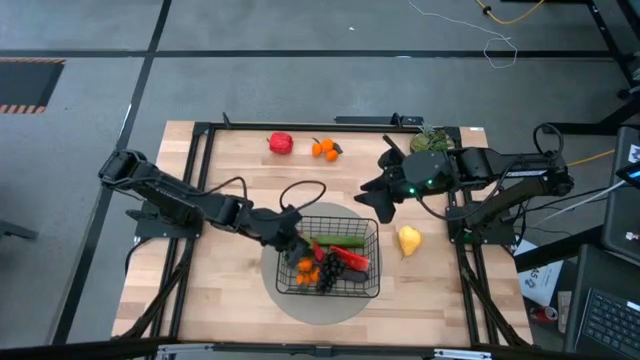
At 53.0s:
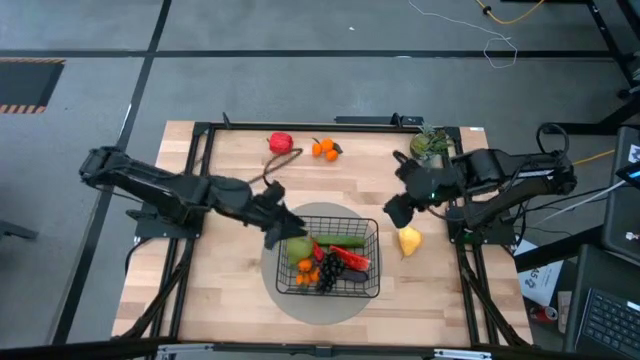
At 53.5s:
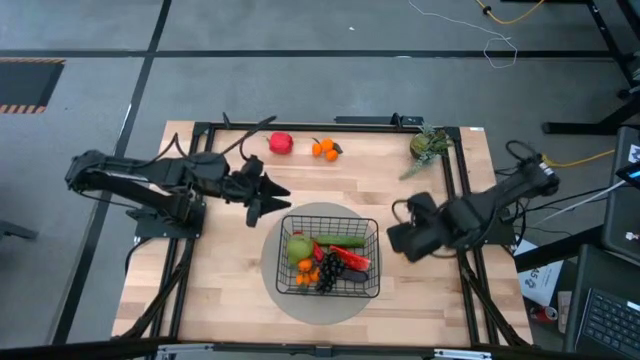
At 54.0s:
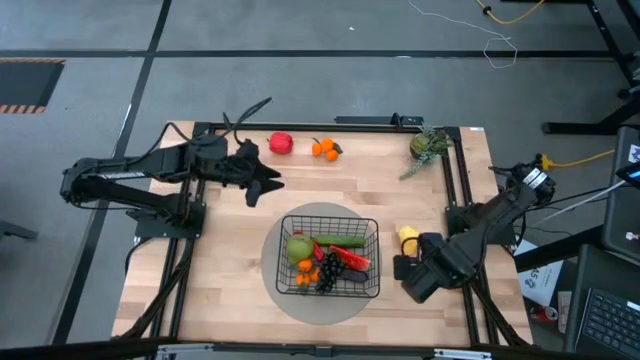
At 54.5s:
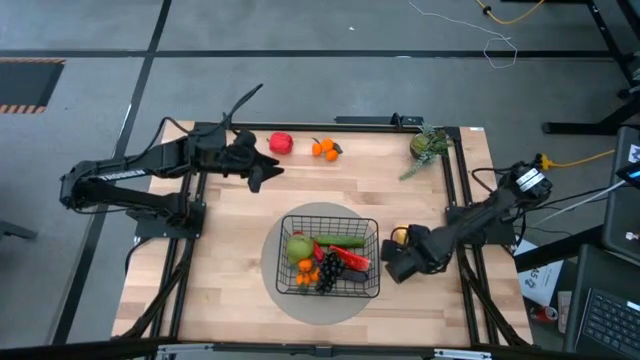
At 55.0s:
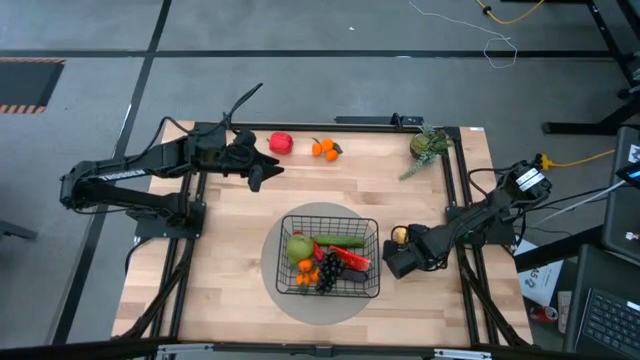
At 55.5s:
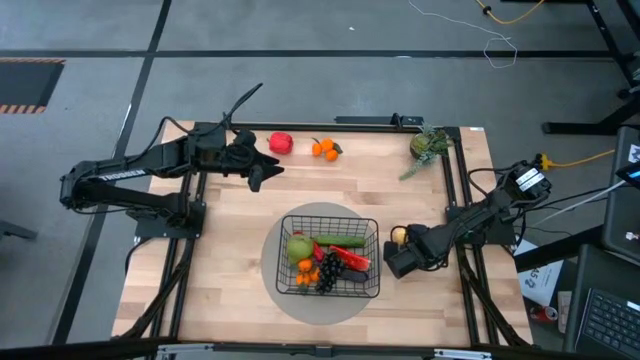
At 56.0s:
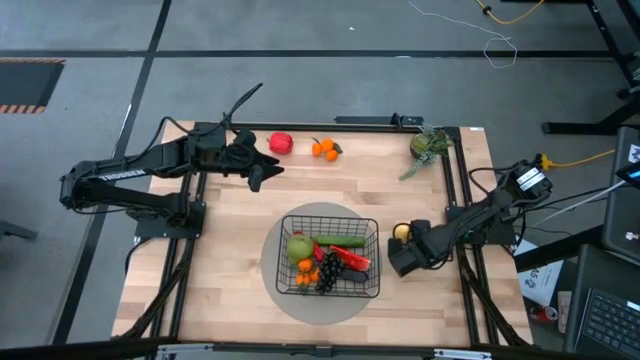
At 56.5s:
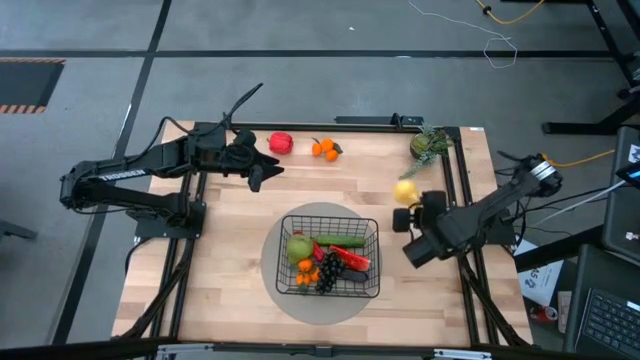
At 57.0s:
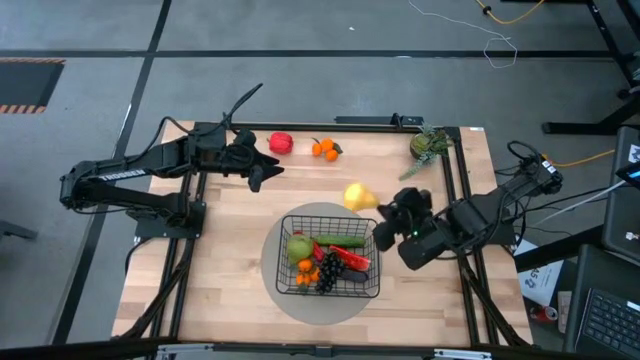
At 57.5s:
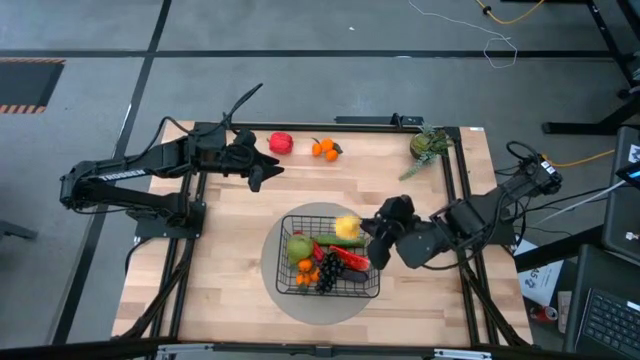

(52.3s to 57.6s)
Task: Build produce basket
Put the yellow pear into the black wire basket

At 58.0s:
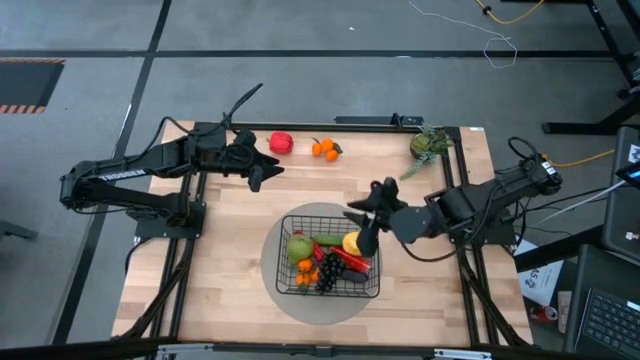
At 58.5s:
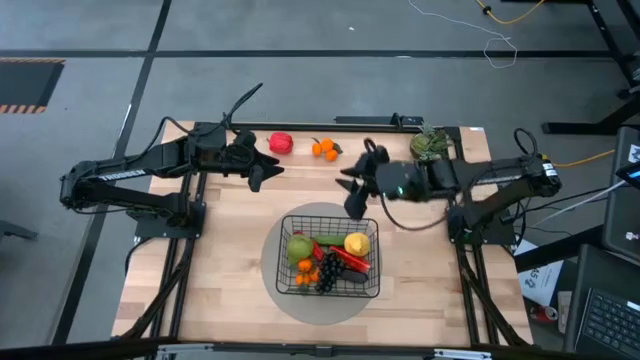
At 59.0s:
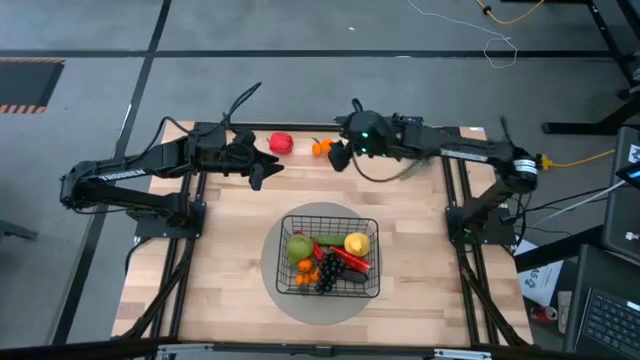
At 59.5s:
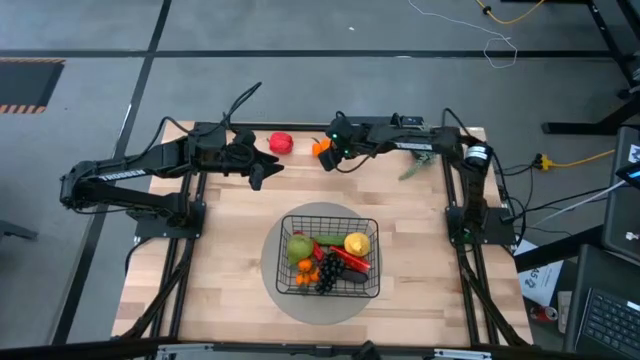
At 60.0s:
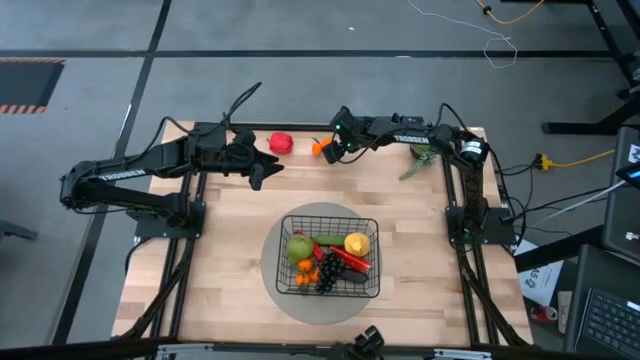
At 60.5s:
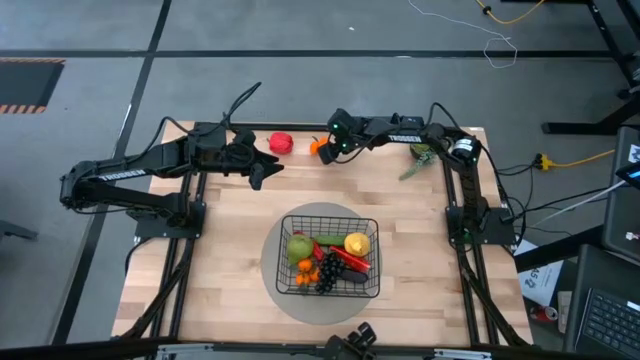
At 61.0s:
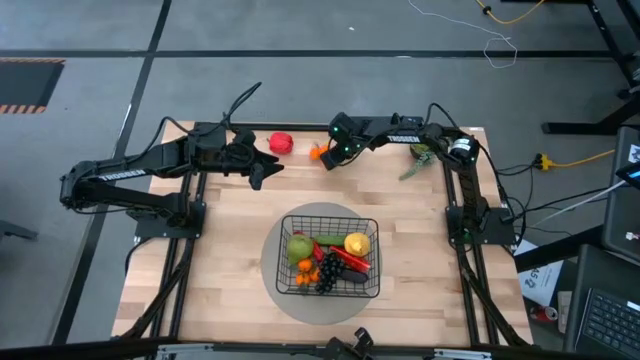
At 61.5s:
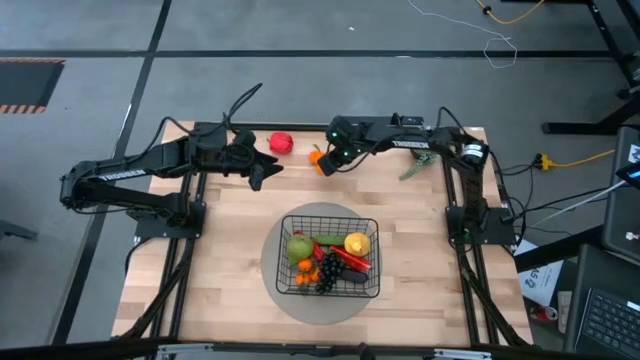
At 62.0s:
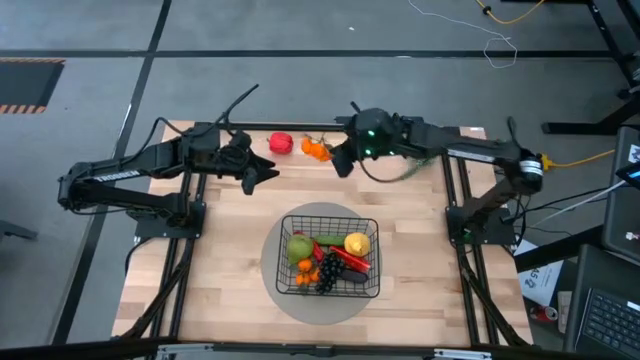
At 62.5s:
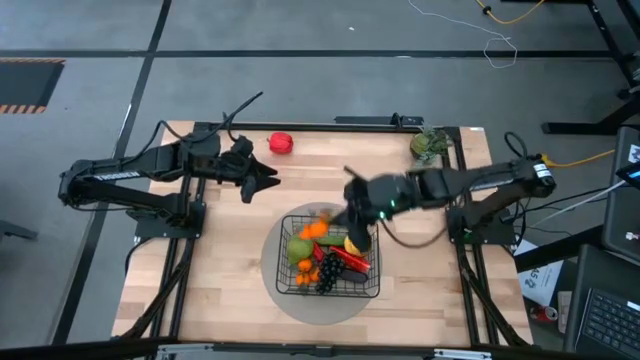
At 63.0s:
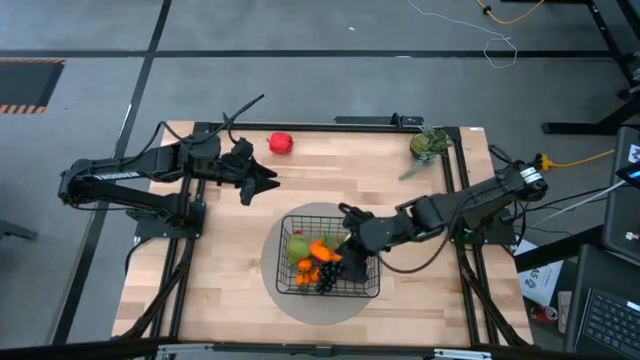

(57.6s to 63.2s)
Put the orange tangerines into the black wire basket

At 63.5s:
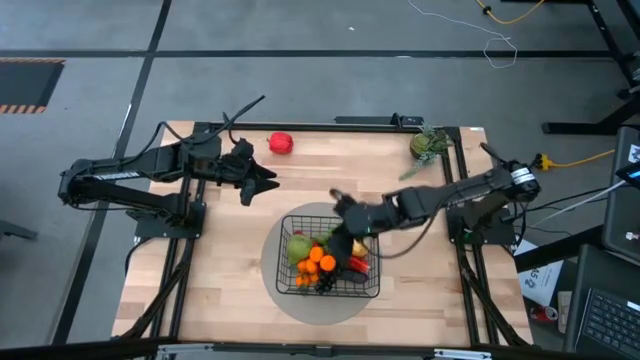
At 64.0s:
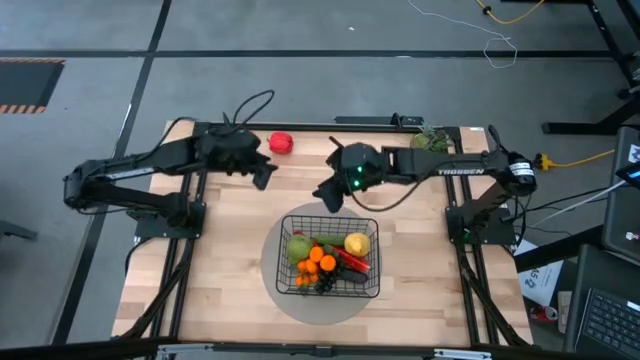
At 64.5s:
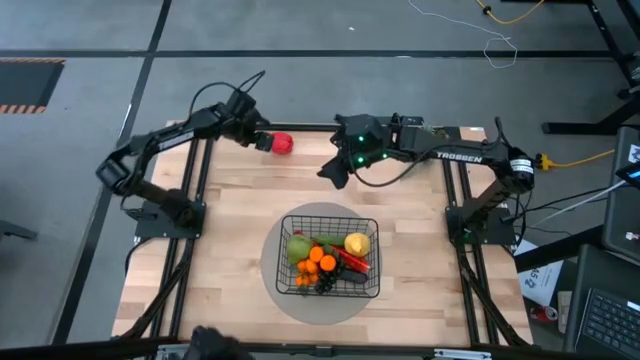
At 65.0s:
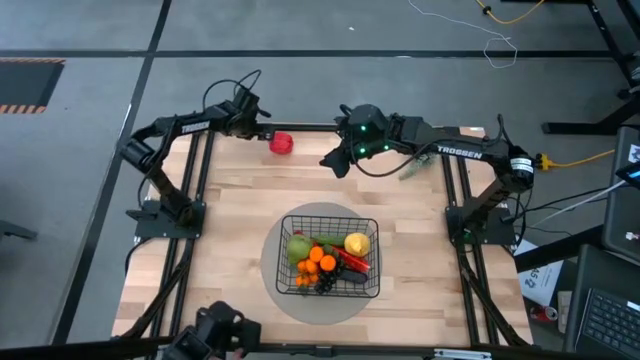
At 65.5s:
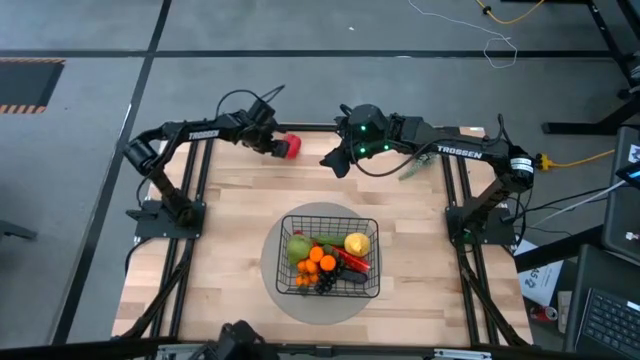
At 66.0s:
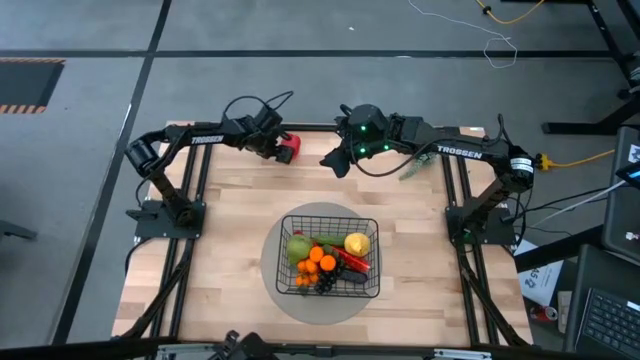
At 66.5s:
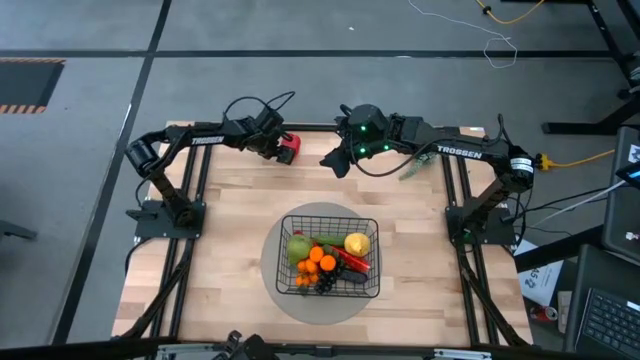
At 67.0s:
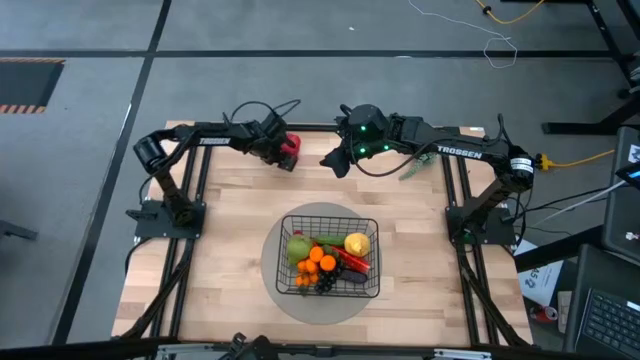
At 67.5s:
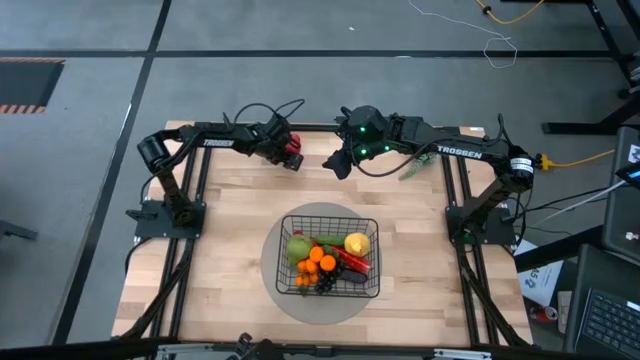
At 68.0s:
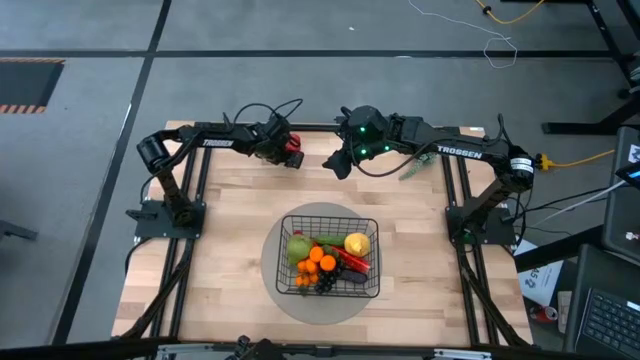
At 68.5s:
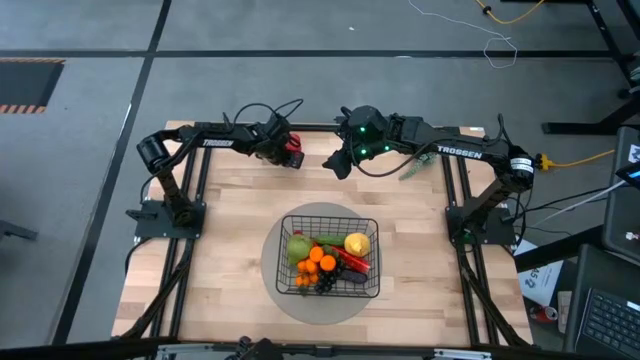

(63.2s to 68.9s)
Put the red bell pepper into the wire basket

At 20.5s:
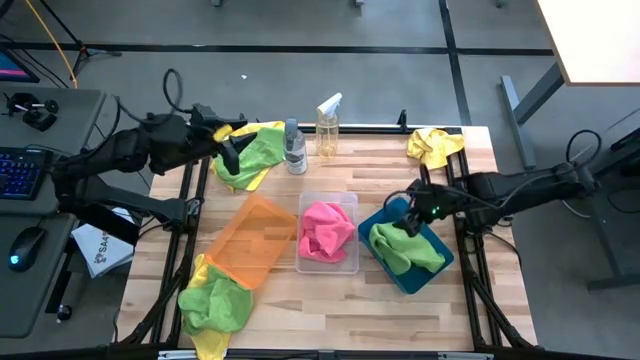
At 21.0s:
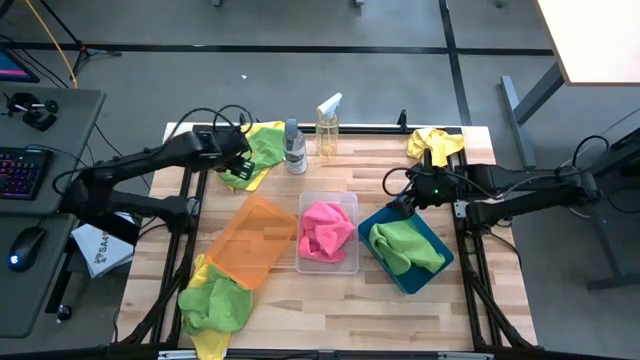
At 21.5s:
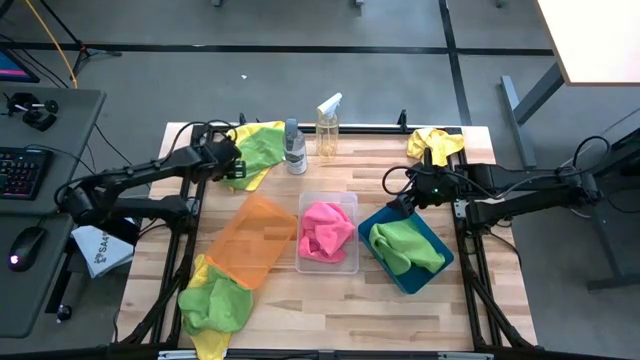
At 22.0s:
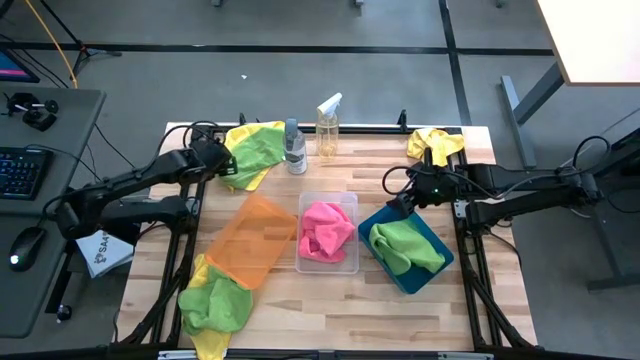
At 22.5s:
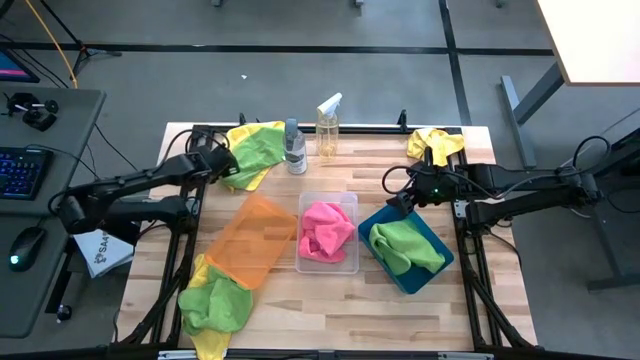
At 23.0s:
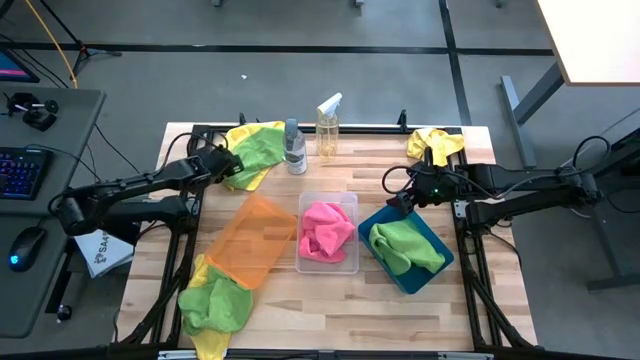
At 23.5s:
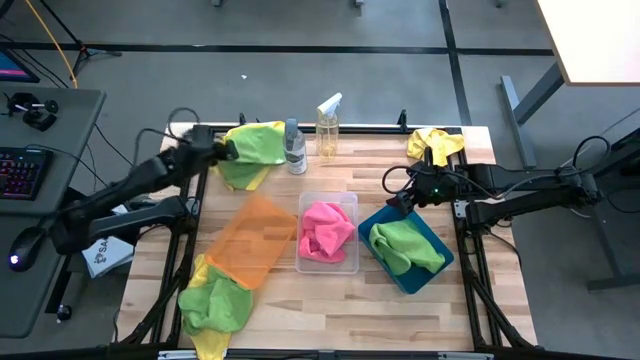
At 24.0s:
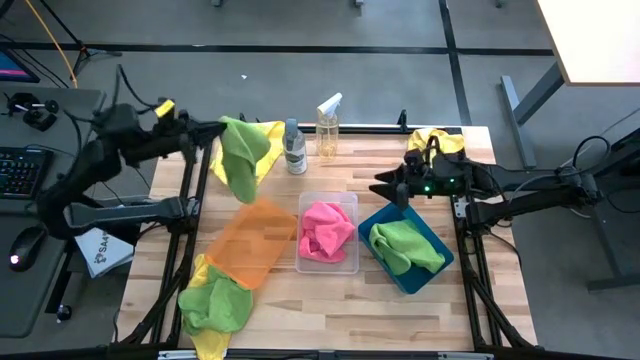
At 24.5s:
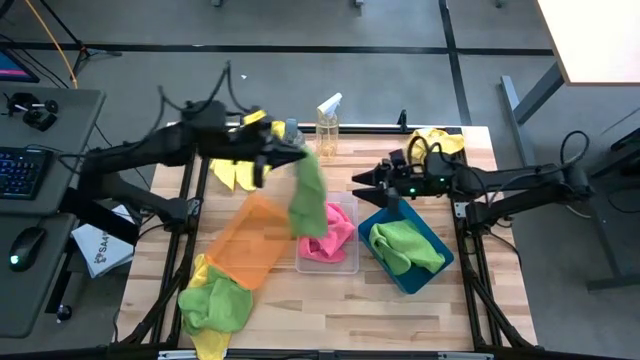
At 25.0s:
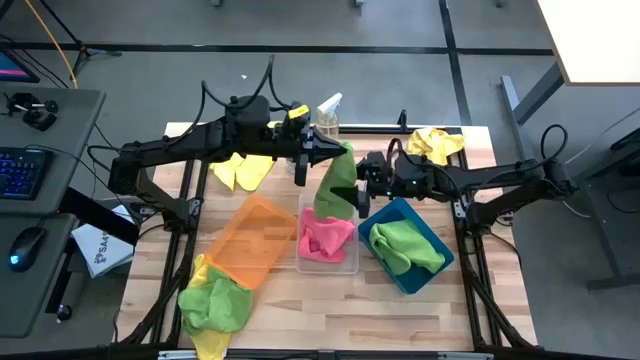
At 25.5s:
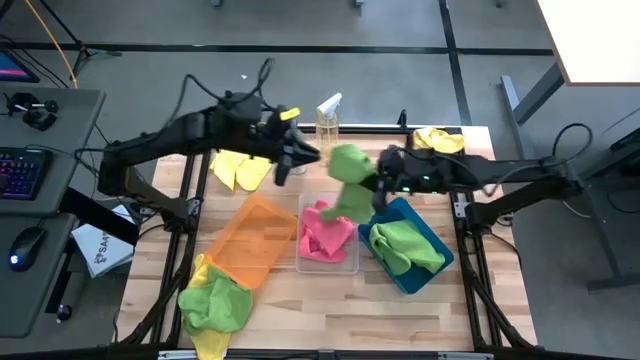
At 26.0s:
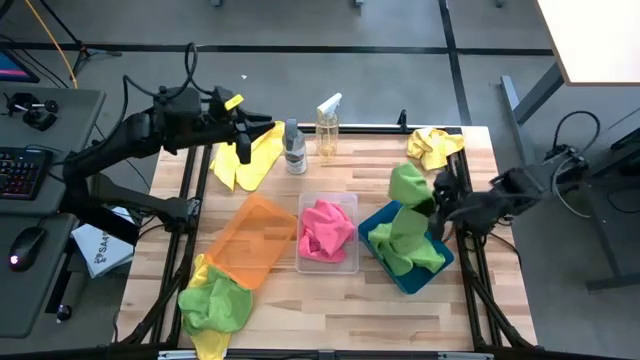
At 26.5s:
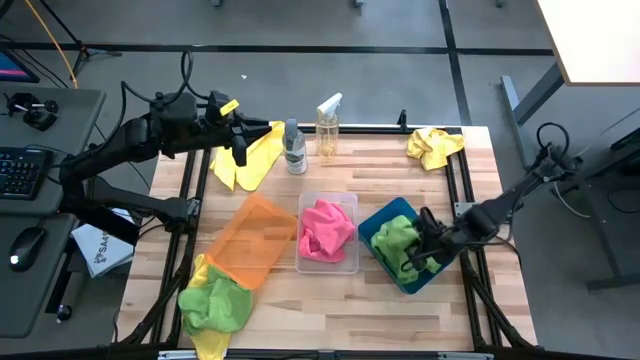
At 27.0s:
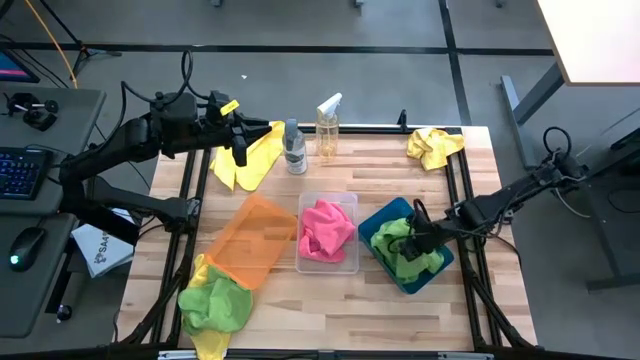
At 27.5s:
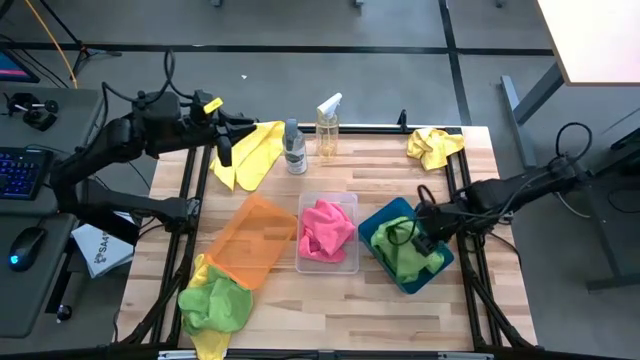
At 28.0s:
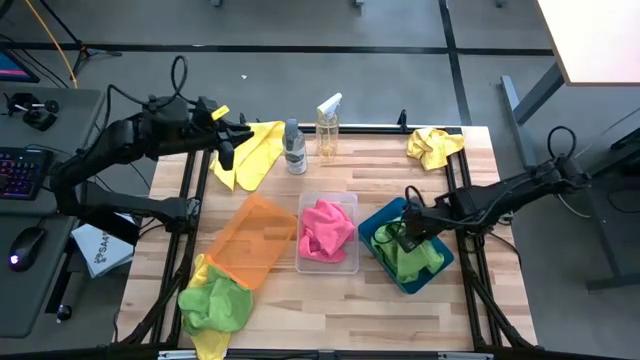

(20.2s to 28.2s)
Task: Sort microfiber towel by color & place in baskets
Put the top green microfiber towel into the blue bin
